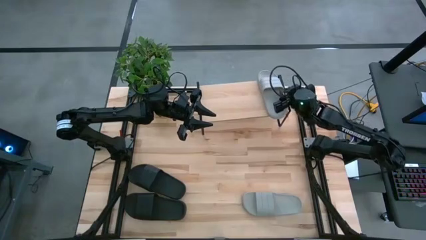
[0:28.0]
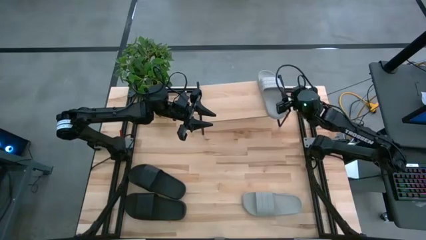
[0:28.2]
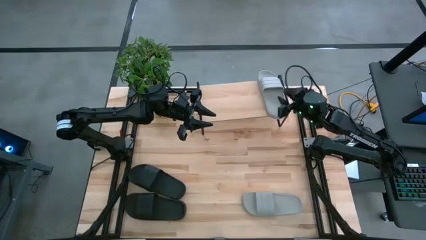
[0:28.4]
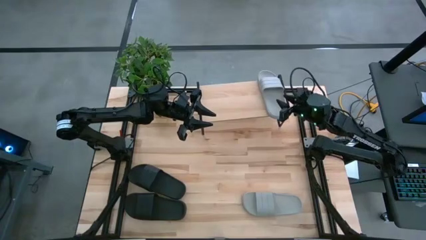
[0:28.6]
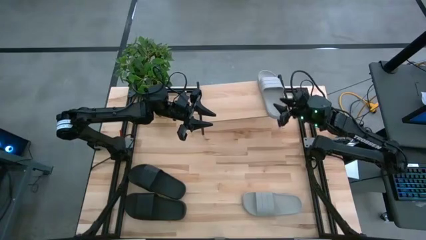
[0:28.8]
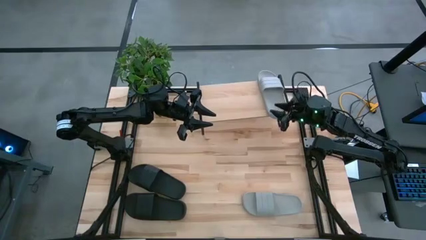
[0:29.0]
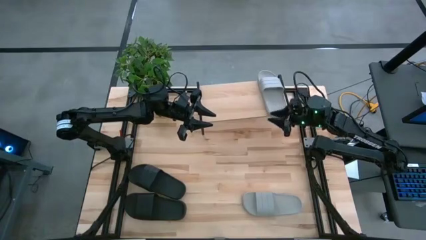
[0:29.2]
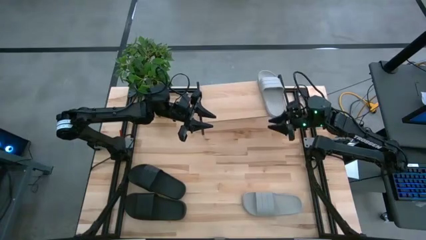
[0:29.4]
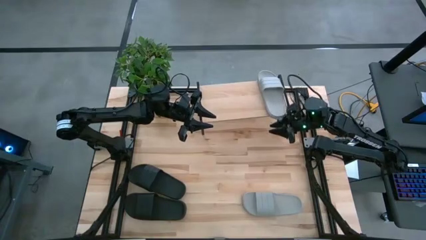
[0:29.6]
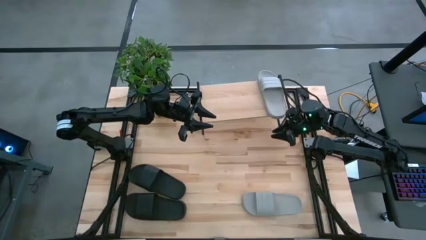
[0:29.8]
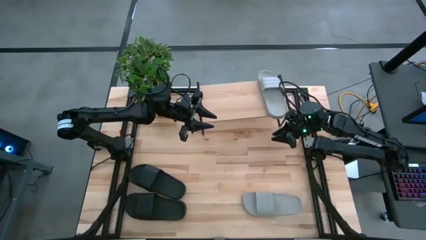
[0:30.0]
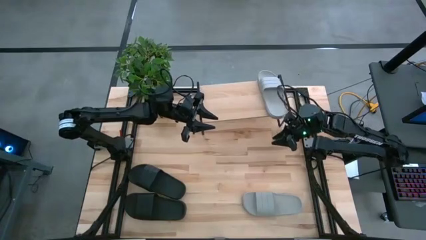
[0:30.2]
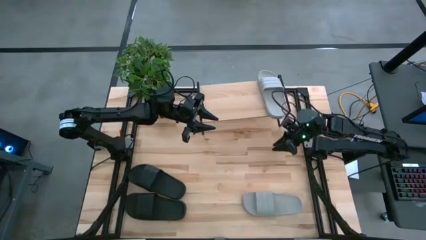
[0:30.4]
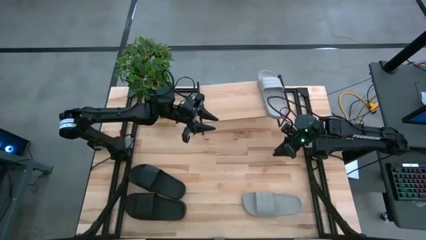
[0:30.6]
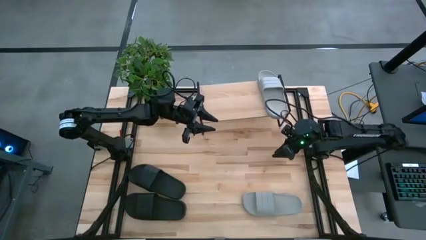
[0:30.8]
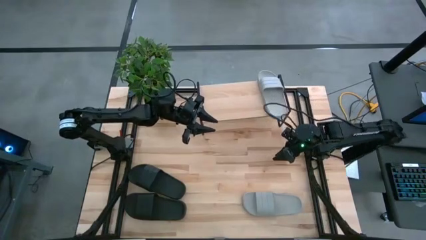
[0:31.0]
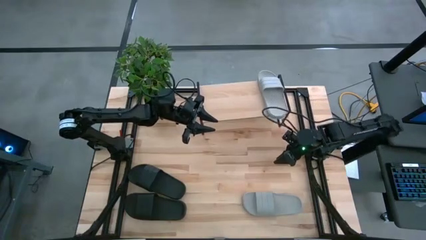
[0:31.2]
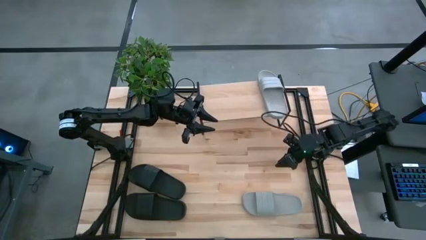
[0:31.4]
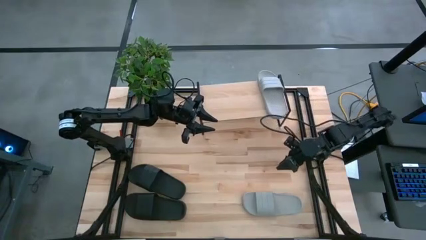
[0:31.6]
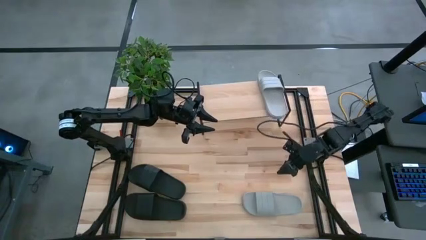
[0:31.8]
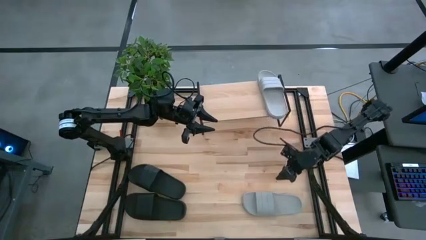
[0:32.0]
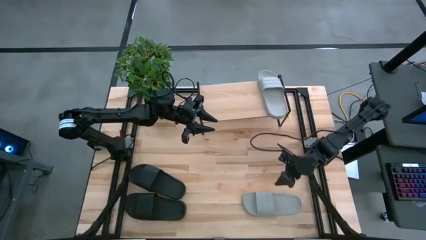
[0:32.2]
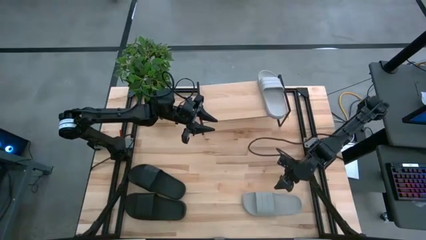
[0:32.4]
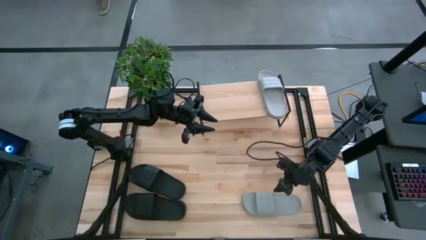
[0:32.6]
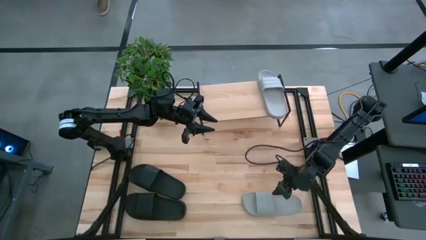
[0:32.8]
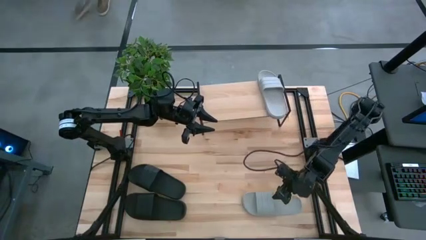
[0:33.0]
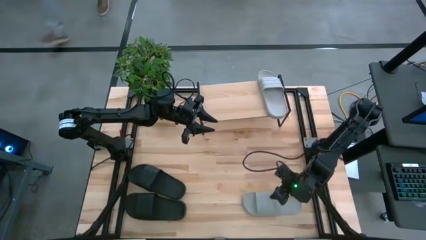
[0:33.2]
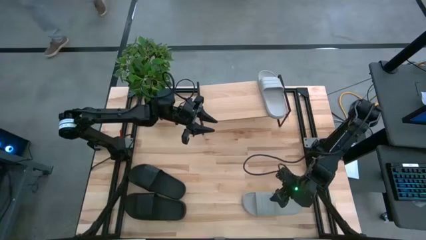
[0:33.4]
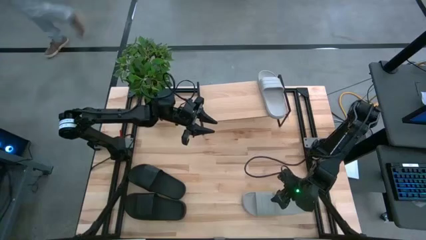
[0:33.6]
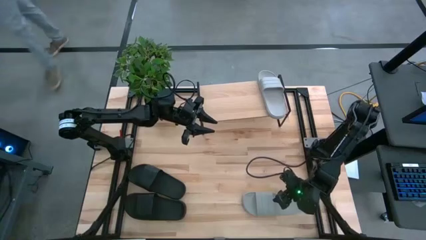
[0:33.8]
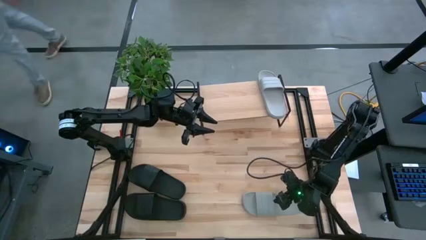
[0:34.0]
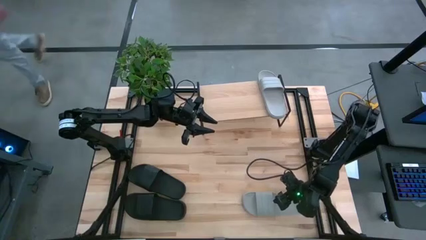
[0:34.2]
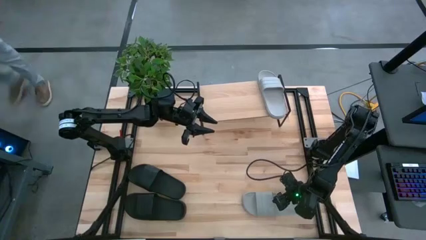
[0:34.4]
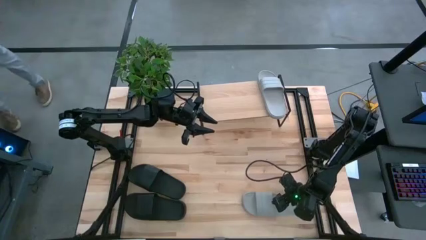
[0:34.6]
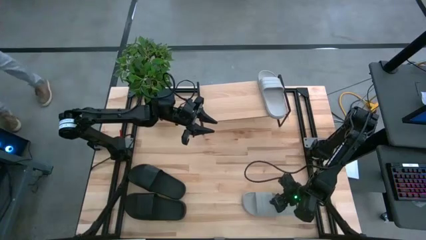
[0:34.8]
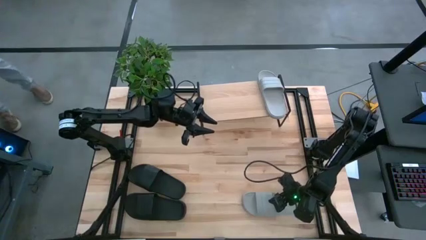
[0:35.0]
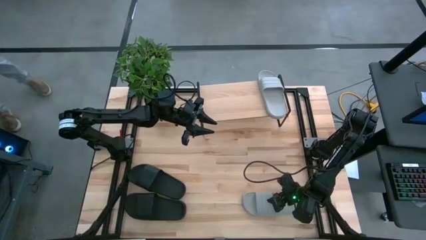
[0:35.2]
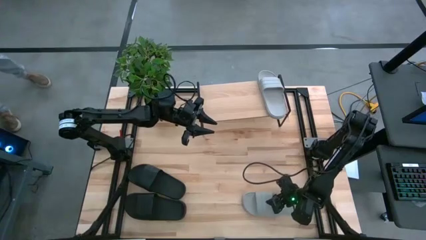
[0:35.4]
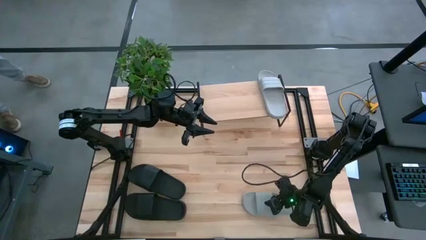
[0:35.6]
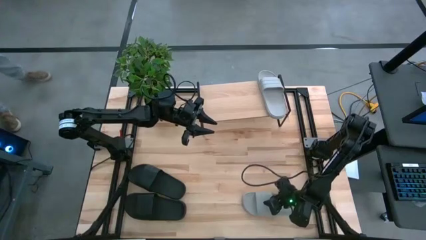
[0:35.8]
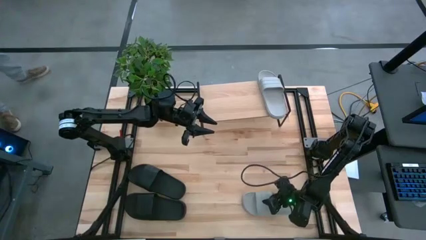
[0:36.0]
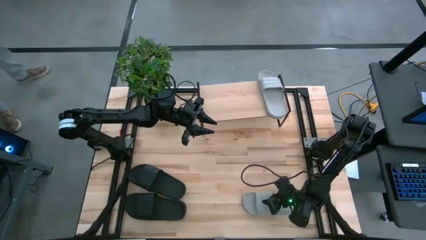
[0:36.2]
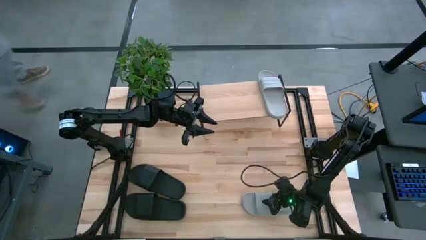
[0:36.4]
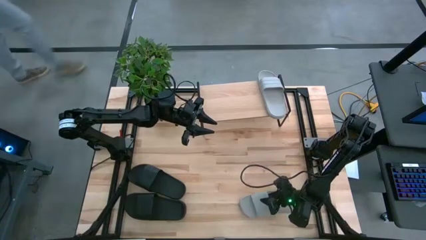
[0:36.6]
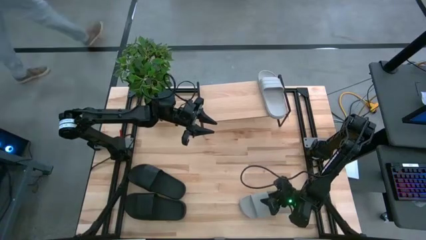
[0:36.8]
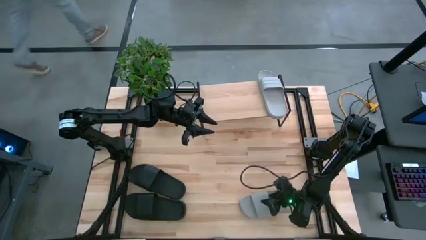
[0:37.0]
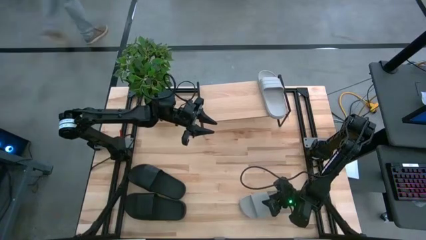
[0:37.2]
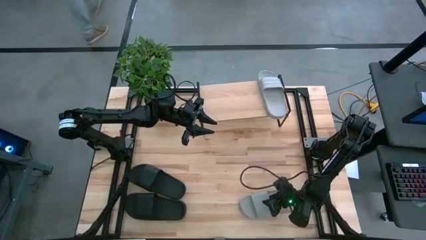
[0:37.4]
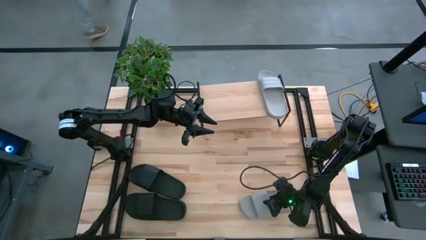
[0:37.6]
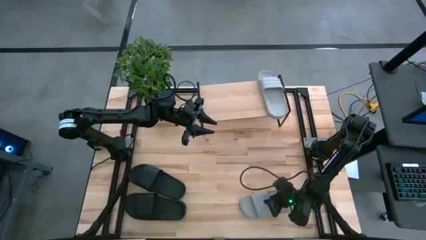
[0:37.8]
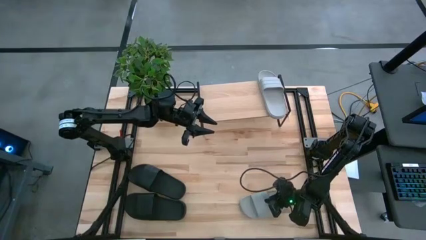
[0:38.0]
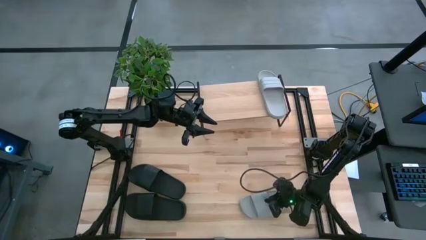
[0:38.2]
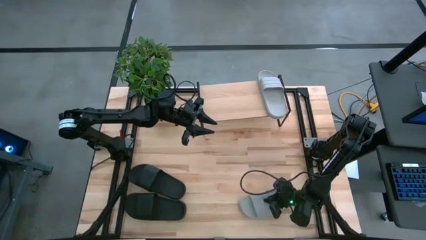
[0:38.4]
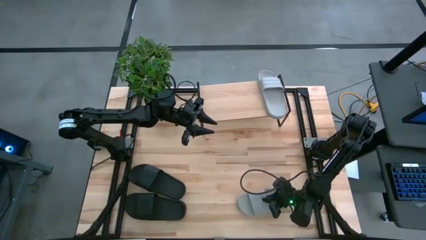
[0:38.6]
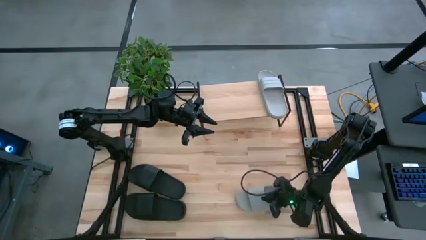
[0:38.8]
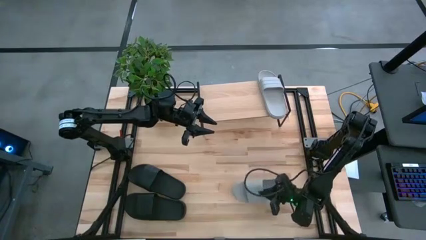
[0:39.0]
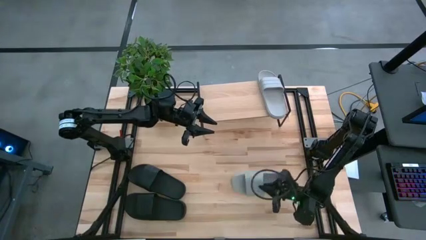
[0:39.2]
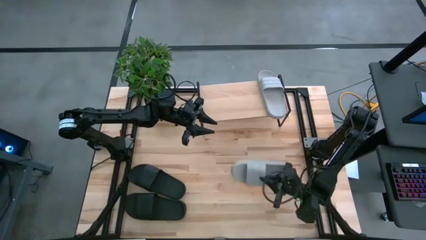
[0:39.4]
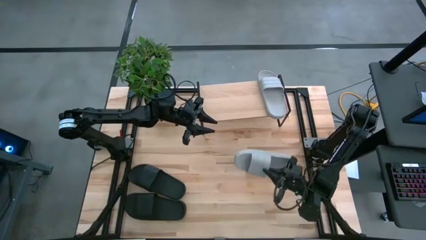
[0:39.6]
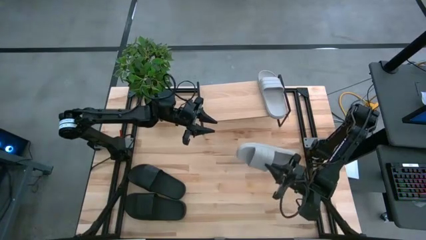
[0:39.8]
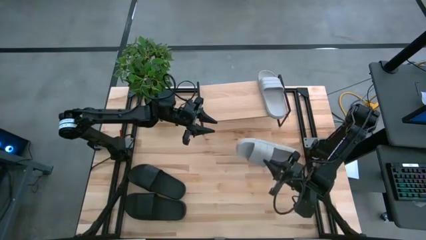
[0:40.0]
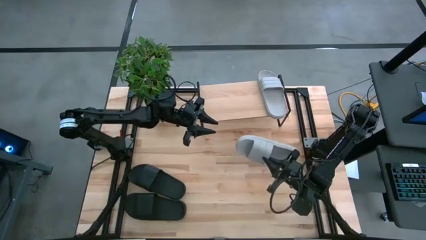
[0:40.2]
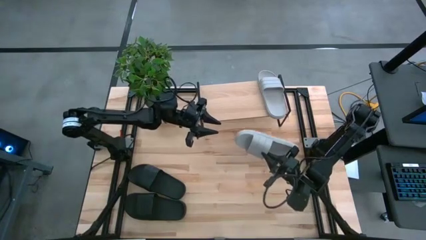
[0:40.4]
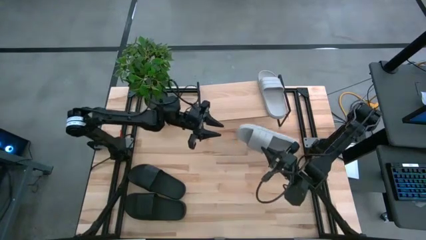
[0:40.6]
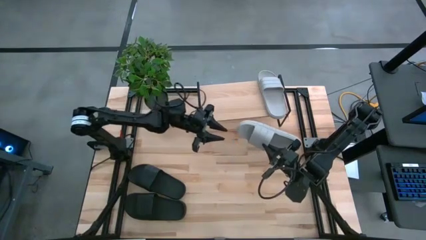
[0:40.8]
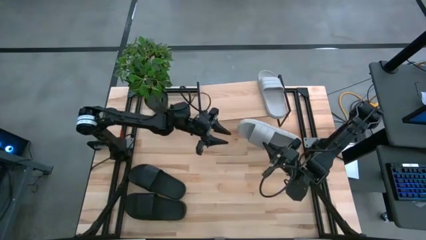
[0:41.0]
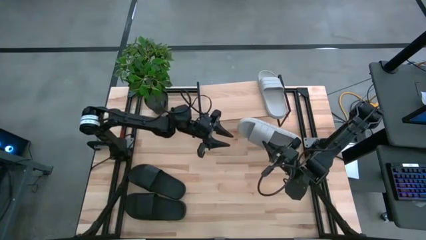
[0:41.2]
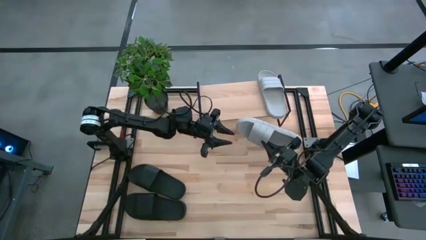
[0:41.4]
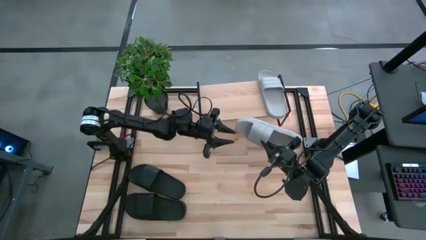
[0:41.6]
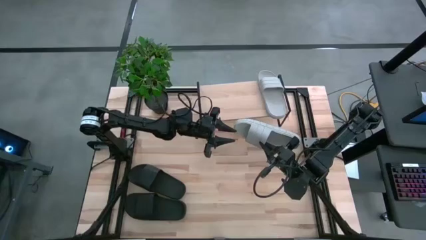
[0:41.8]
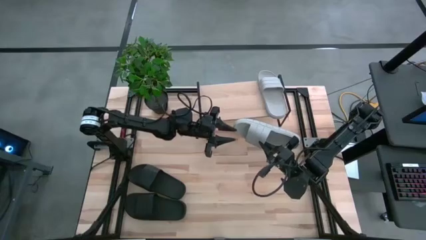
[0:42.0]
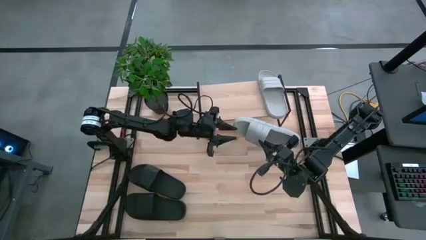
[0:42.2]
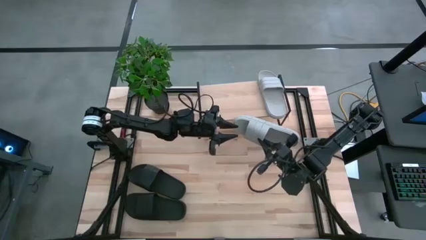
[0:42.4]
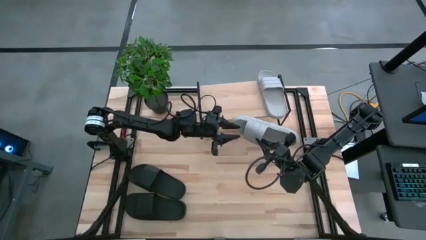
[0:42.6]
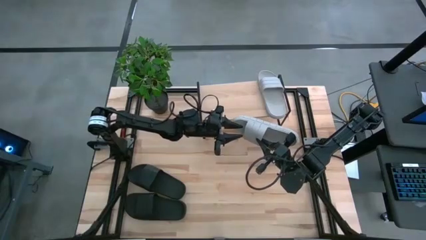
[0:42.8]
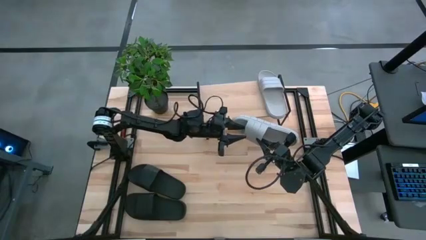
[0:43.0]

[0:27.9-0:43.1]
Task: Pick and place slides into the shelf
Put the gray slide on the shelf

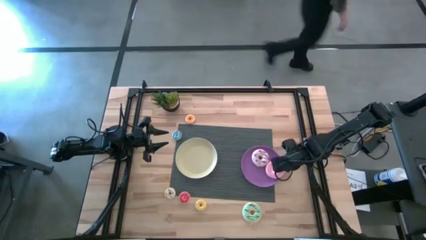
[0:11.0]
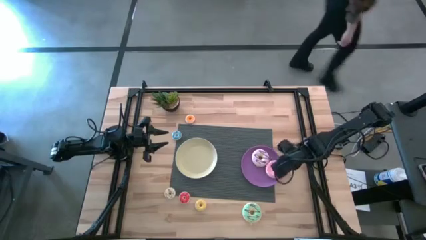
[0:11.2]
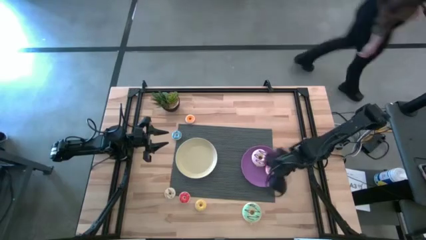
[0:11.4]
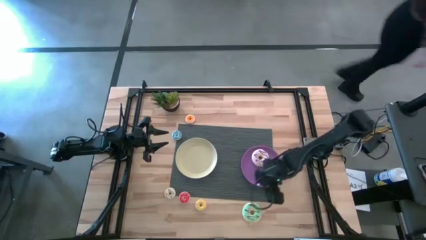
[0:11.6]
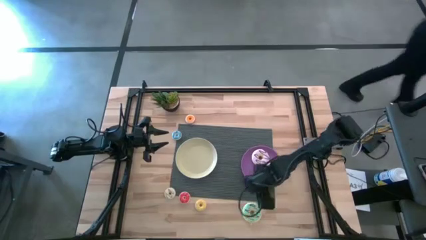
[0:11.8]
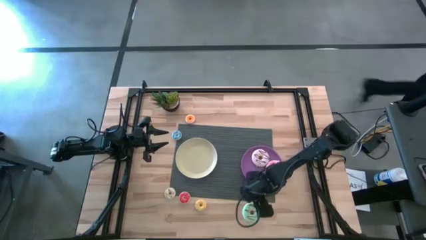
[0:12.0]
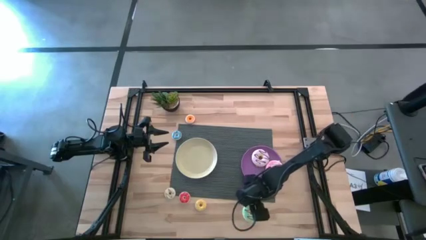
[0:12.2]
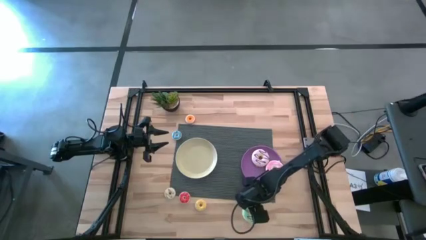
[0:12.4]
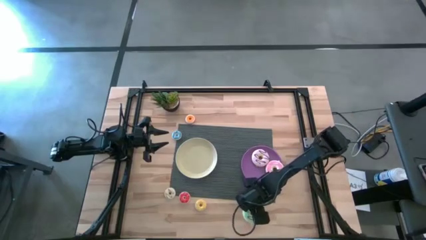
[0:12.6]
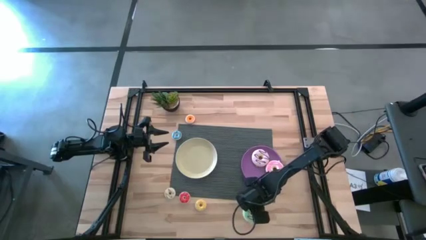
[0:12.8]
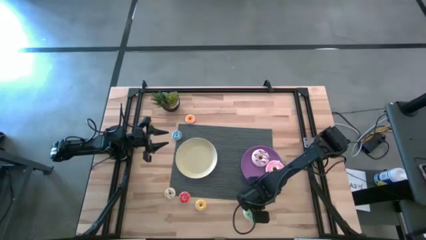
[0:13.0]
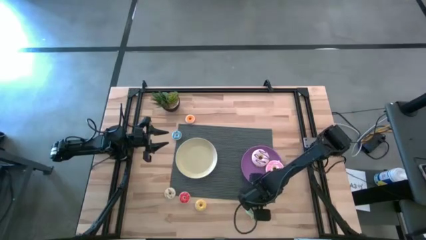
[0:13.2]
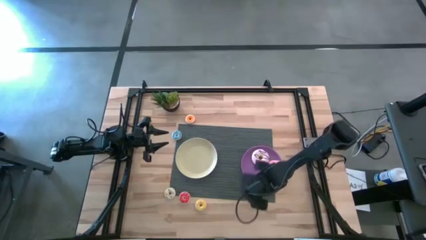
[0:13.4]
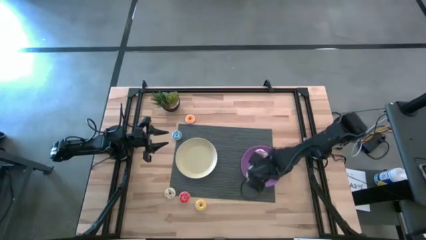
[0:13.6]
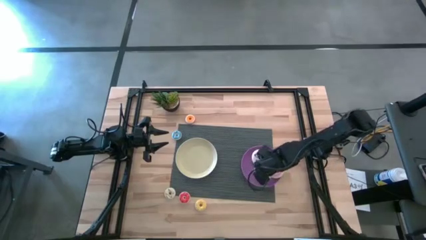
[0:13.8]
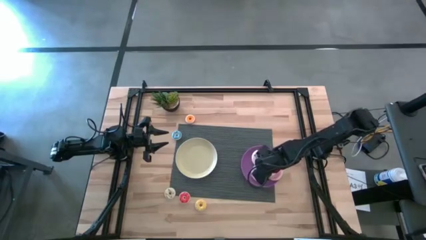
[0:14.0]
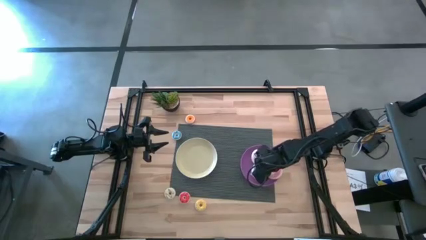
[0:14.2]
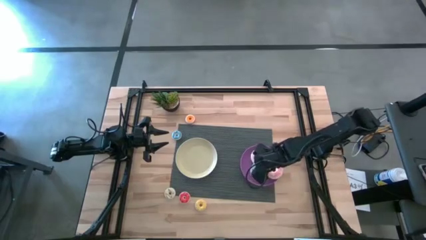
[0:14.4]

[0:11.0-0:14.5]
Task: Pick & Place donuts
Put the large green donut on the purple plate
